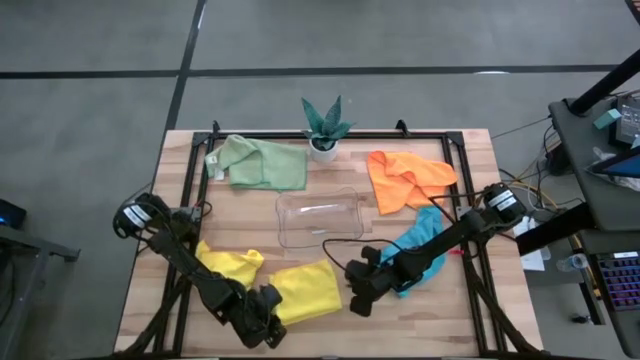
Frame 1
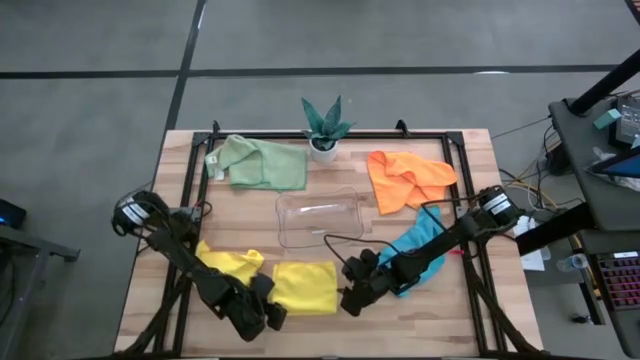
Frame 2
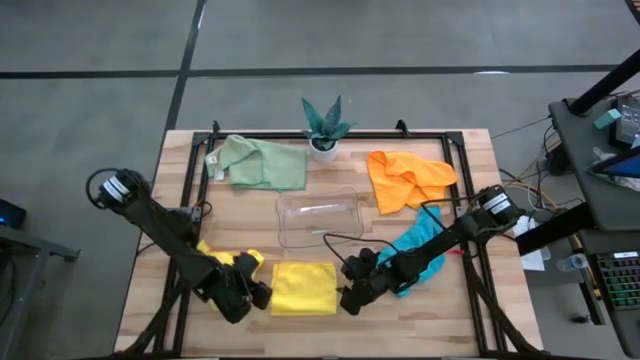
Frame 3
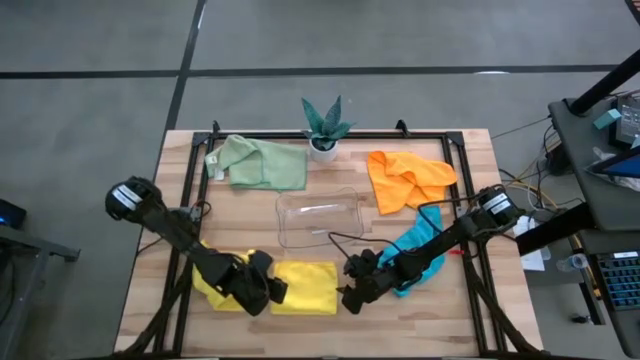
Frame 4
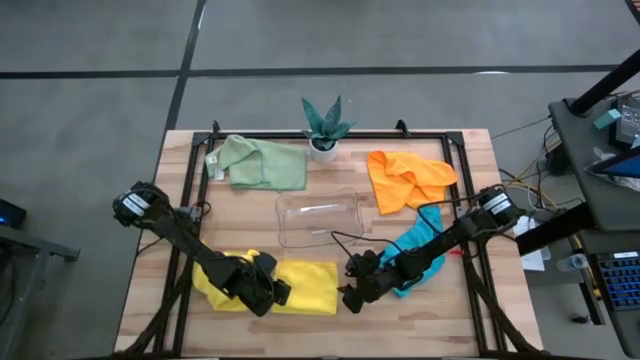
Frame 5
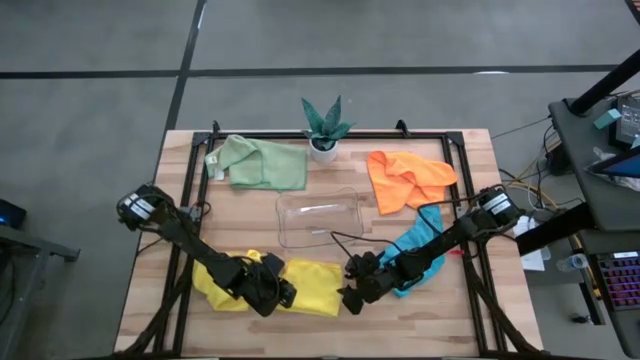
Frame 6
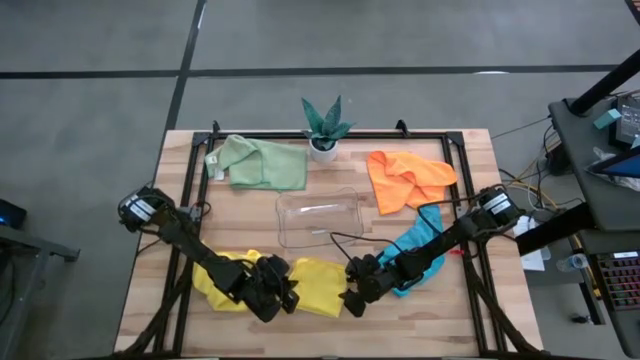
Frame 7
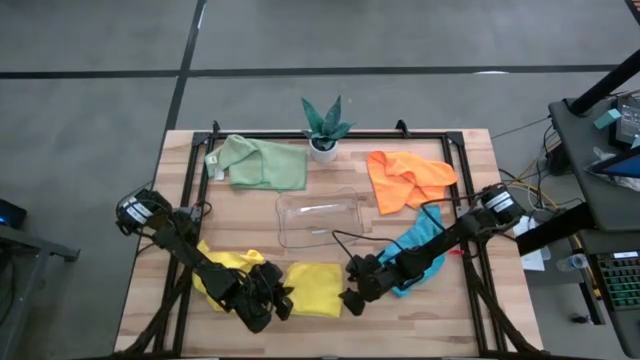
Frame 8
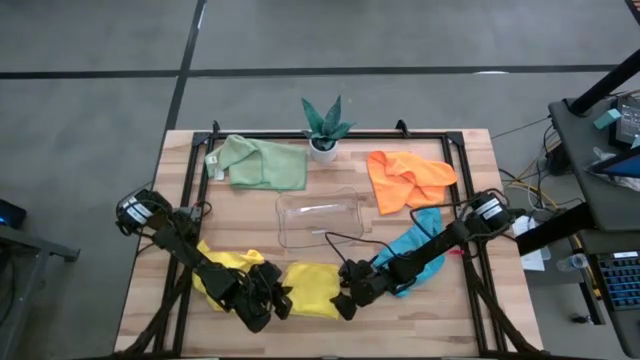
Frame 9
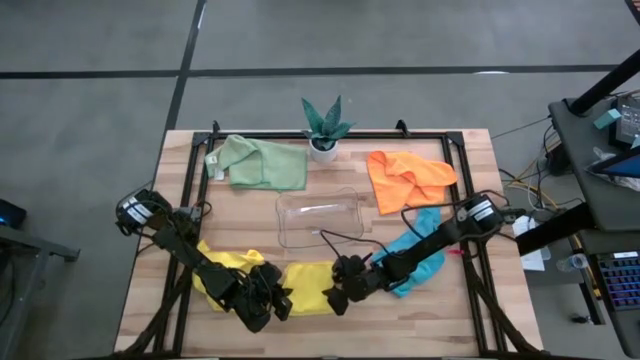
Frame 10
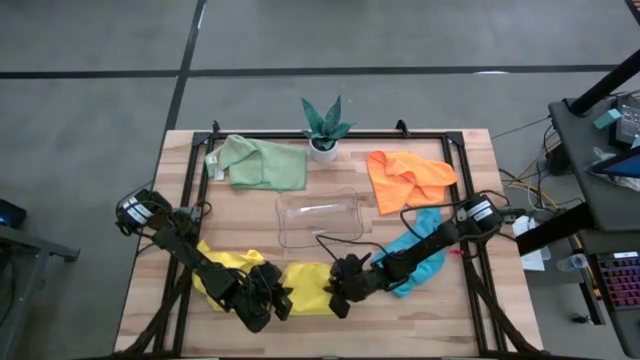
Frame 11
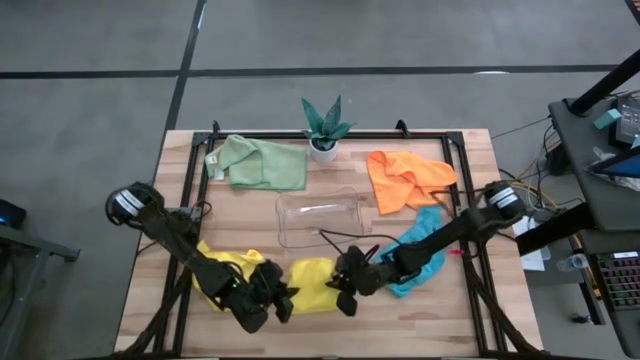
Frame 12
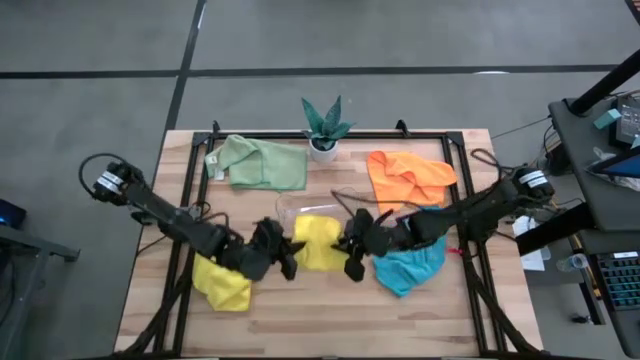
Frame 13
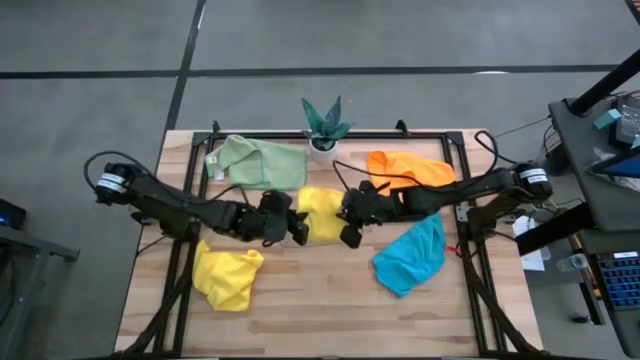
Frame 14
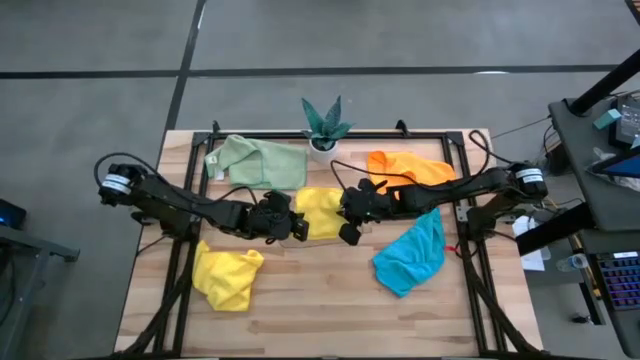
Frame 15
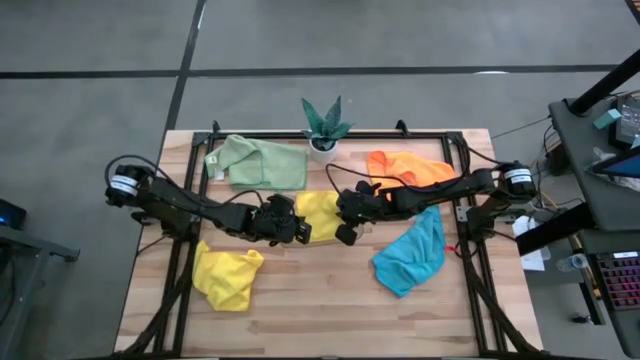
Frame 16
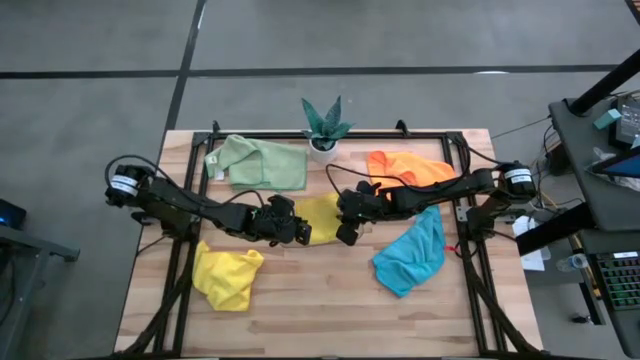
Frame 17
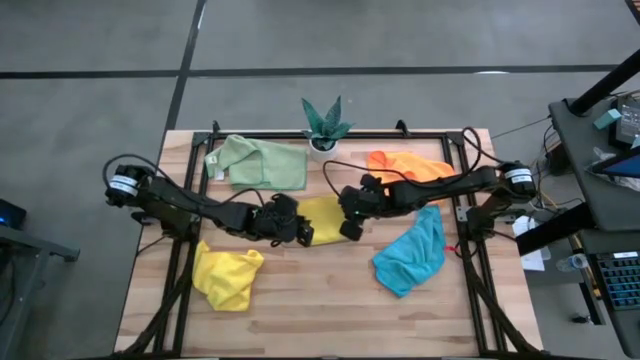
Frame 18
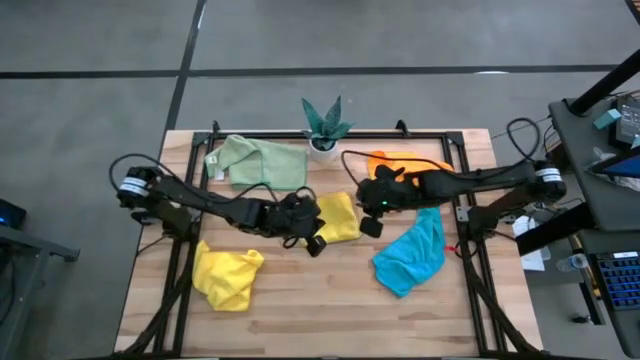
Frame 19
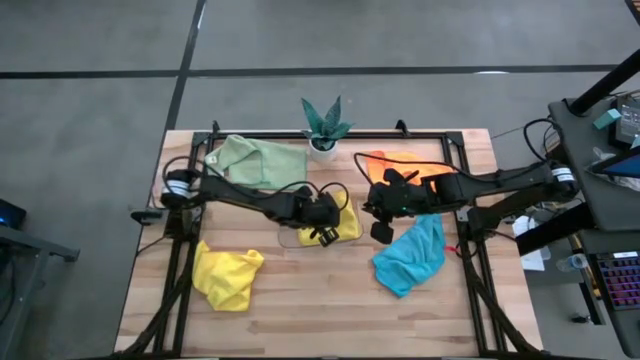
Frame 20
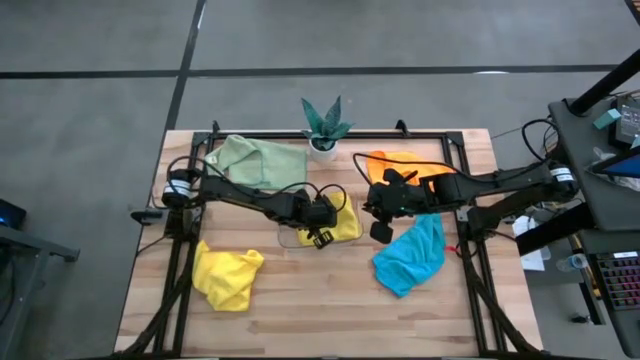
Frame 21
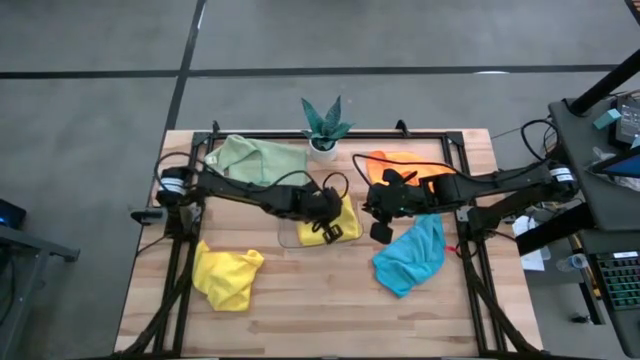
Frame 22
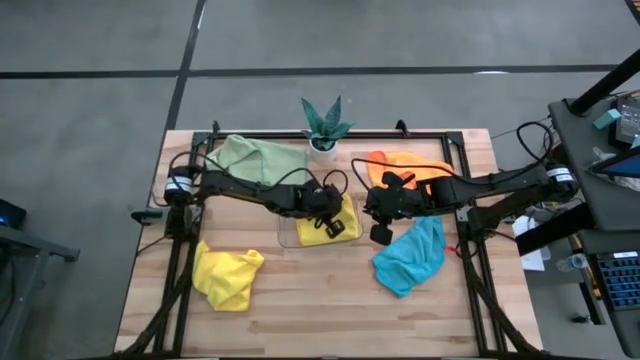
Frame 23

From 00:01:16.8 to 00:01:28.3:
Task: Fold microfiber towels
Put the right folded yellow microfiber towel into the transparent bin
